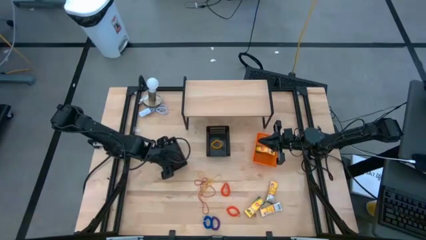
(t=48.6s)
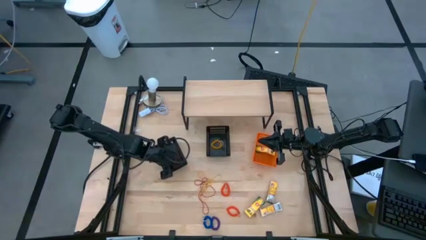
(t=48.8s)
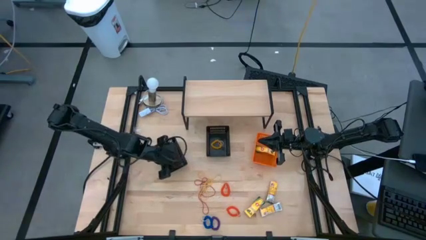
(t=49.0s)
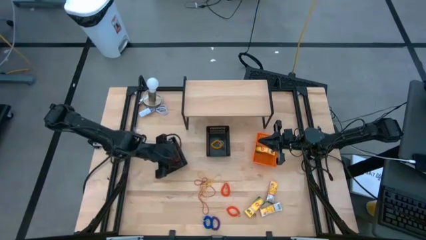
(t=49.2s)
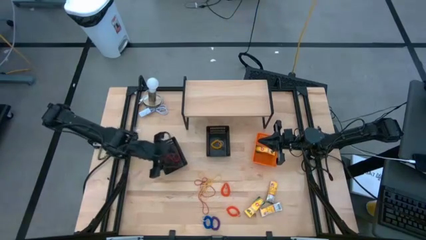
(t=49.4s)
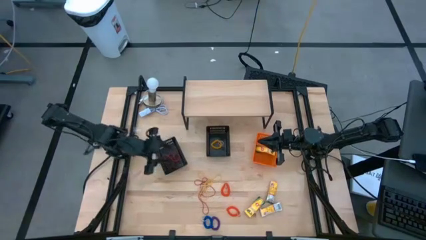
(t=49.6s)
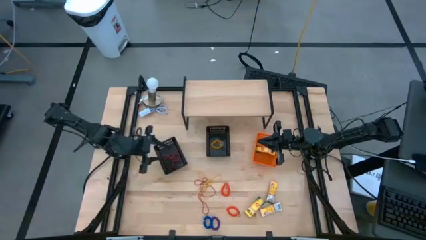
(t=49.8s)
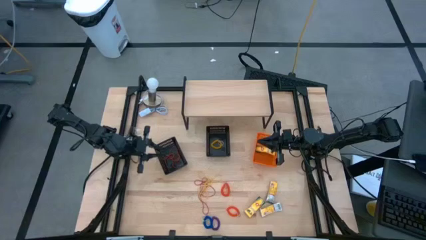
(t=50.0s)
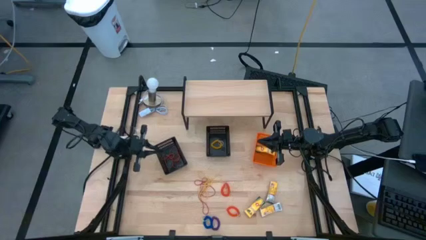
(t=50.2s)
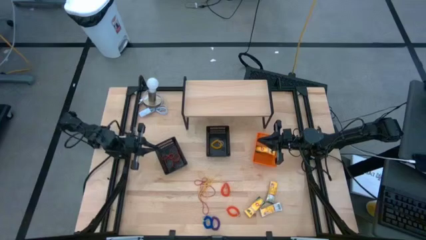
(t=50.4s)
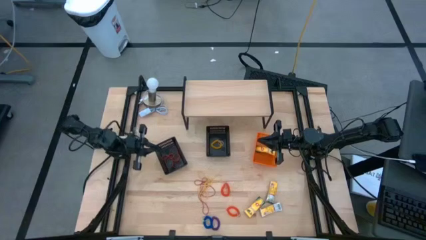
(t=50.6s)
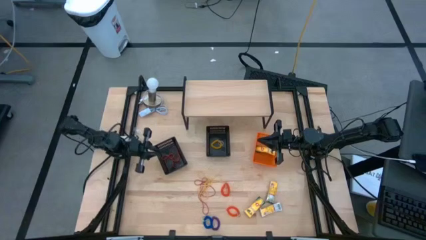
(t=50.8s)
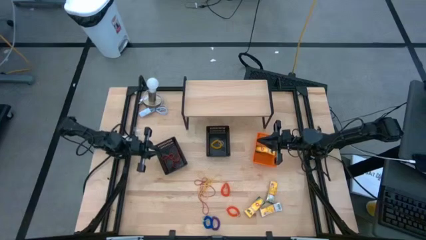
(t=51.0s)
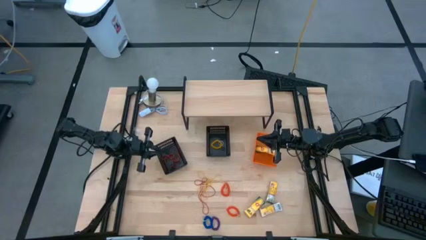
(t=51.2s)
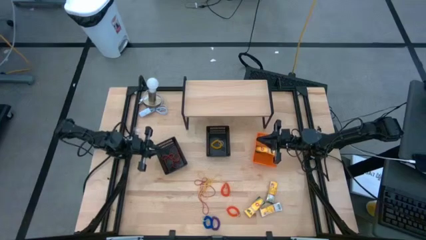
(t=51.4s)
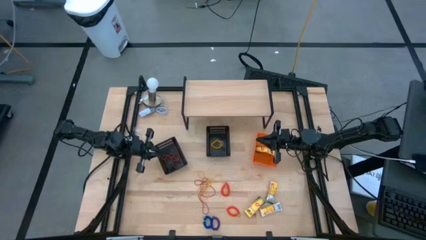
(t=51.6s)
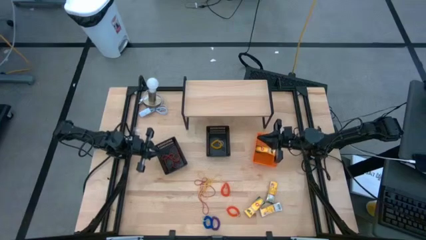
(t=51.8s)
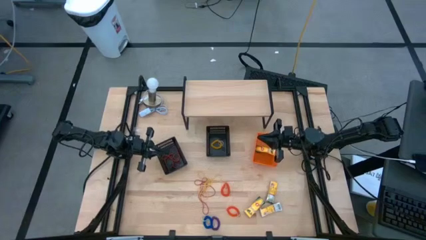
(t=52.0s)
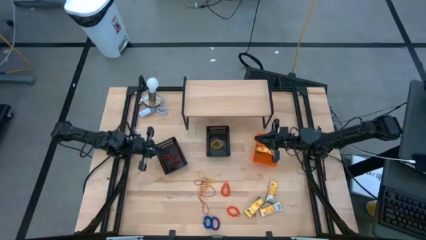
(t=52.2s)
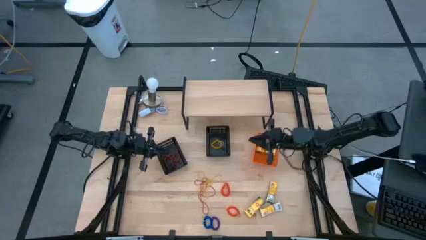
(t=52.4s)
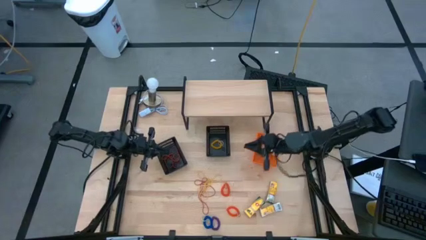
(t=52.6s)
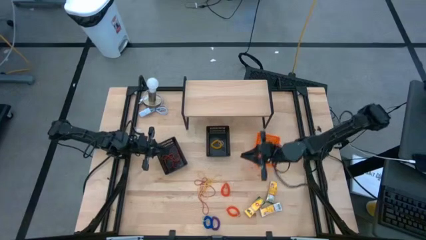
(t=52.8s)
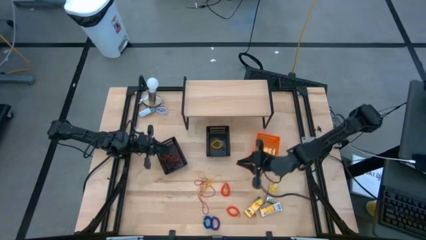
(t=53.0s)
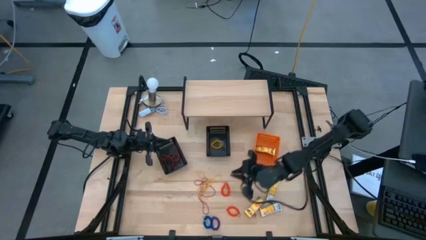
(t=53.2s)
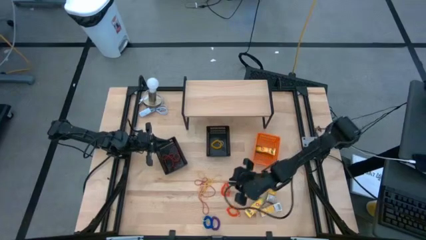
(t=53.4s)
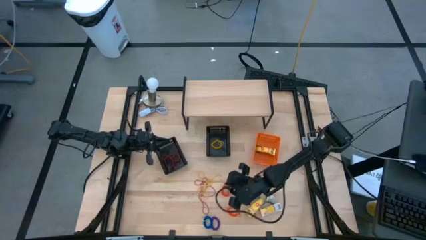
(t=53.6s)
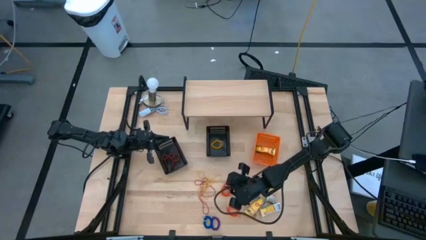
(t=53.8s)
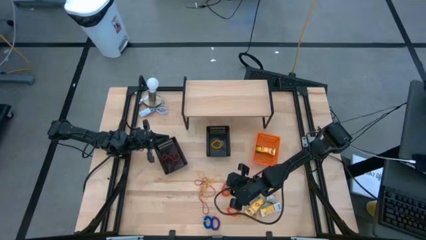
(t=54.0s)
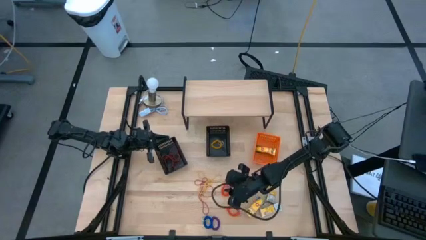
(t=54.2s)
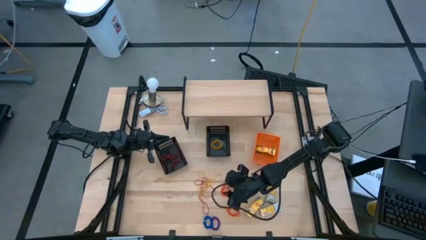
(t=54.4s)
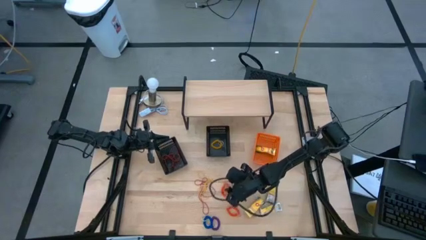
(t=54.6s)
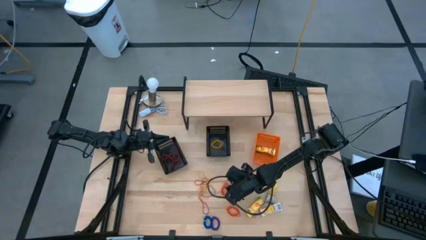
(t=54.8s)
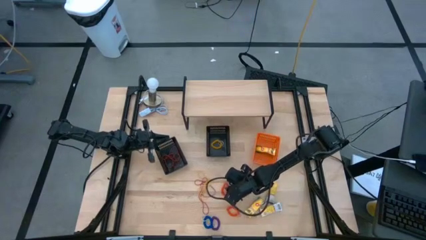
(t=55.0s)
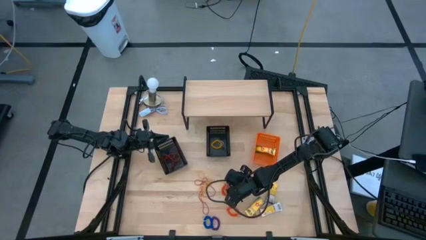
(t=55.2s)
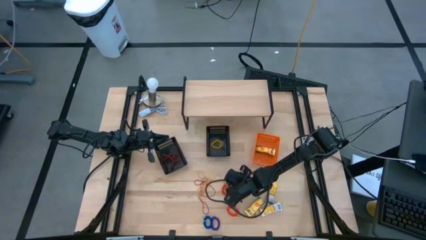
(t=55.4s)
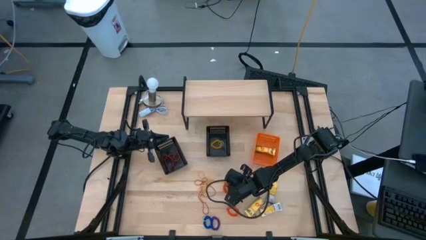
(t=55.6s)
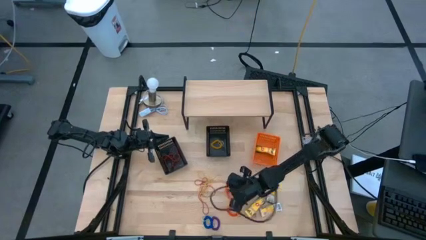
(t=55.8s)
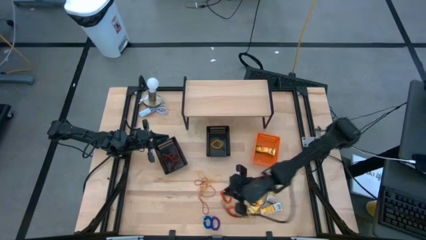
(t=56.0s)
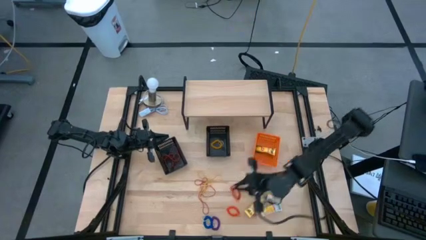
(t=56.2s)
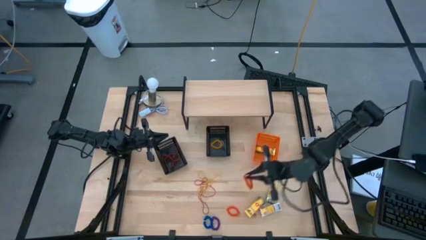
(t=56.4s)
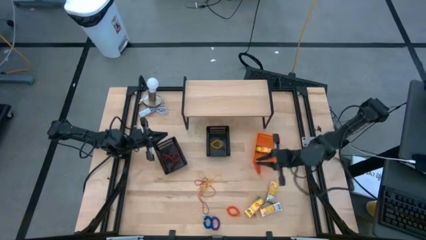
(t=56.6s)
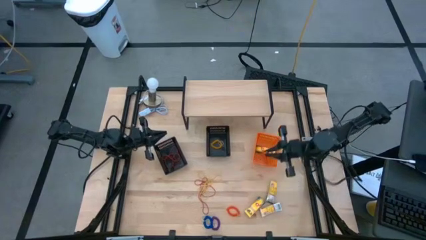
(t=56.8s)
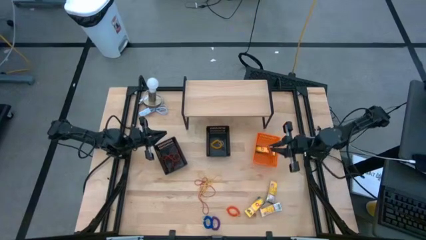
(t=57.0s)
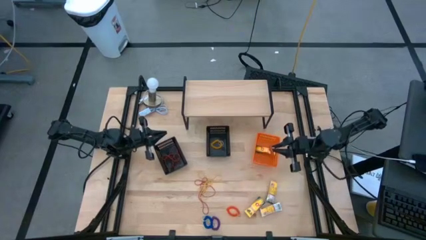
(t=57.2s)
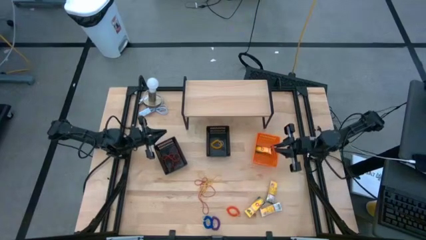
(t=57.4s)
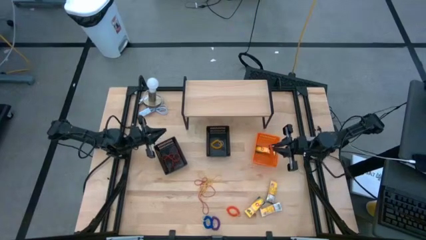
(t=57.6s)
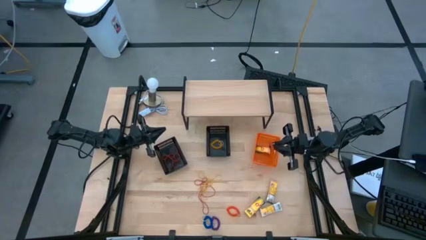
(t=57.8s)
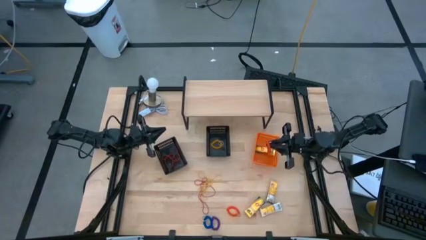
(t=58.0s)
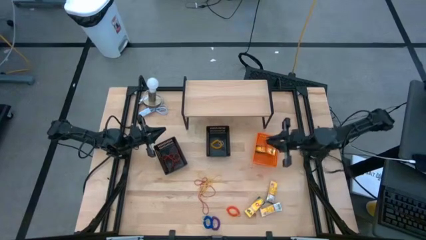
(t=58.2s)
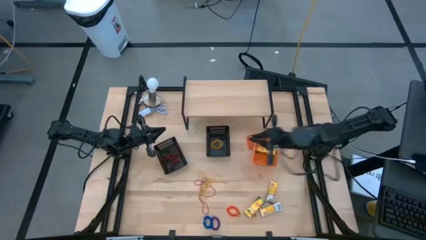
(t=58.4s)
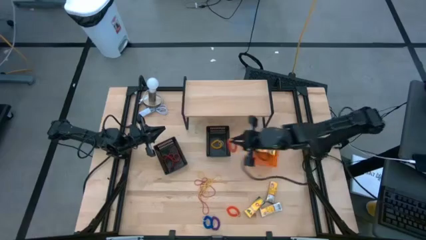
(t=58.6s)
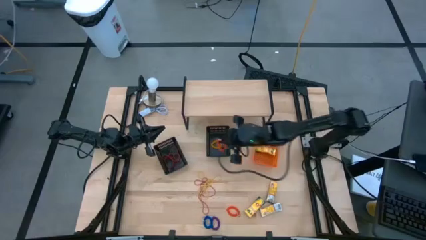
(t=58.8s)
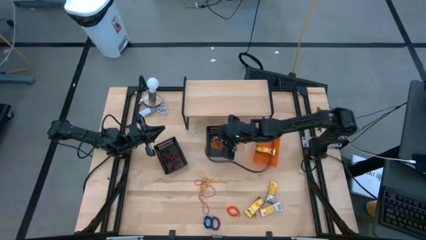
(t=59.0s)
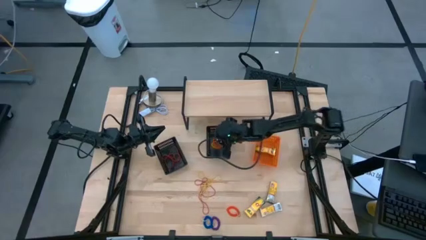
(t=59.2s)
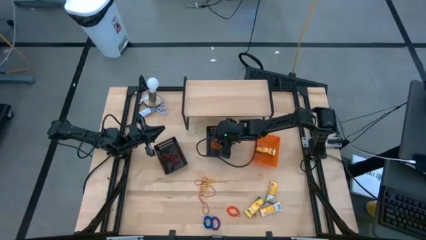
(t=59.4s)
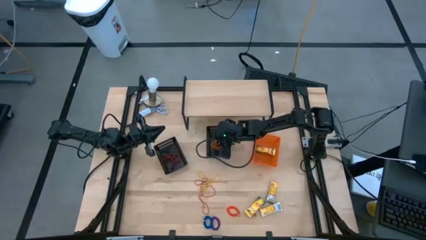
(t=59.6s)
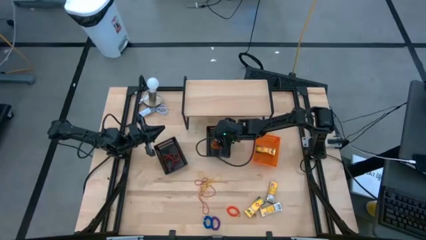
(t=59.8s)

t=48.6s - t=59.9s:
Task: Pick & Place Office Desk Supplies
Put the red spring keychain into the right black basket
